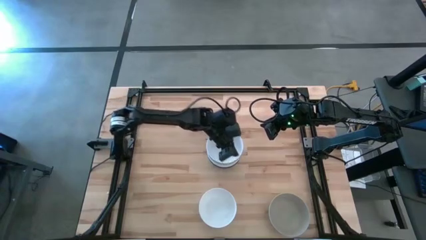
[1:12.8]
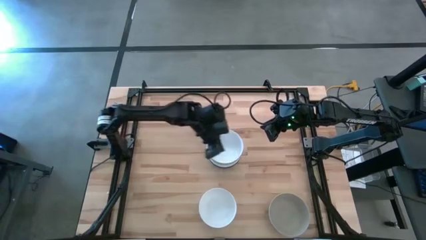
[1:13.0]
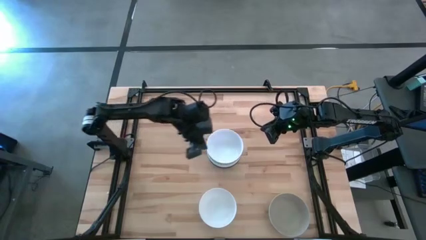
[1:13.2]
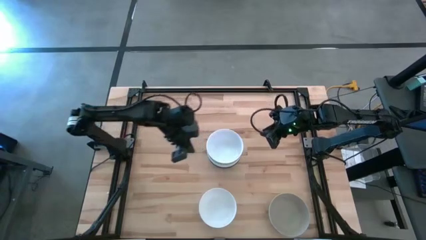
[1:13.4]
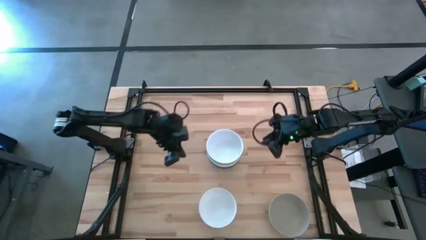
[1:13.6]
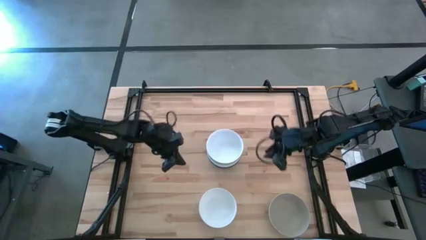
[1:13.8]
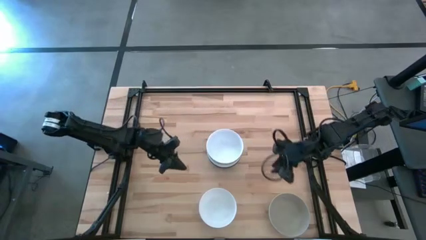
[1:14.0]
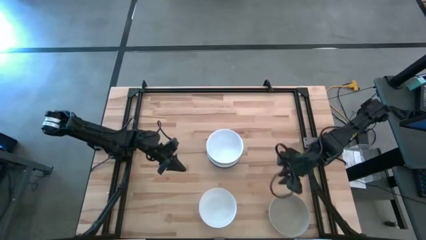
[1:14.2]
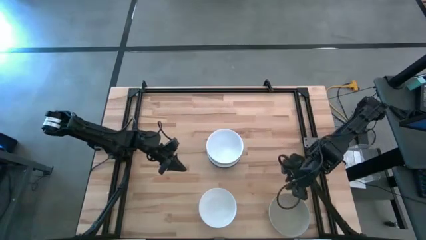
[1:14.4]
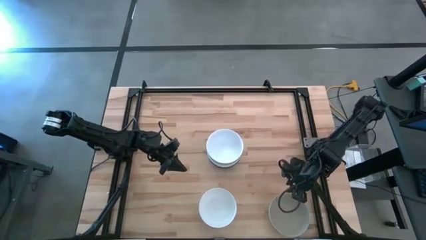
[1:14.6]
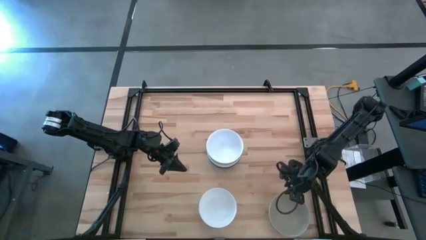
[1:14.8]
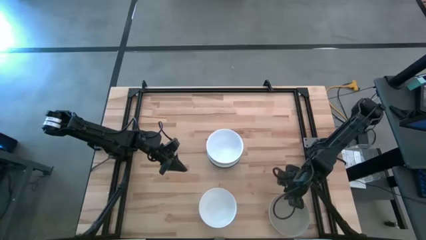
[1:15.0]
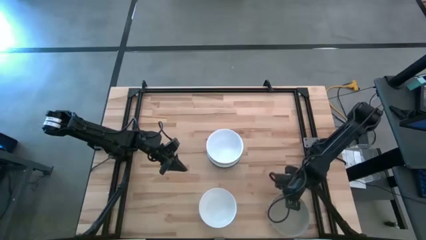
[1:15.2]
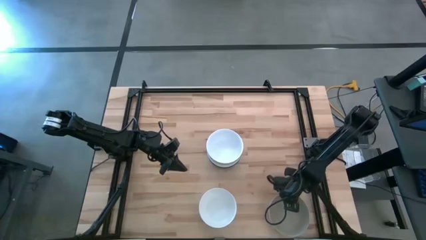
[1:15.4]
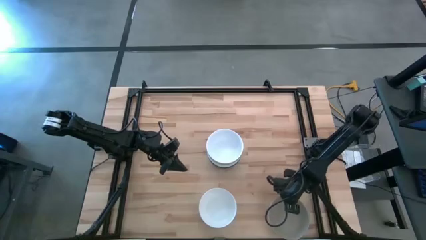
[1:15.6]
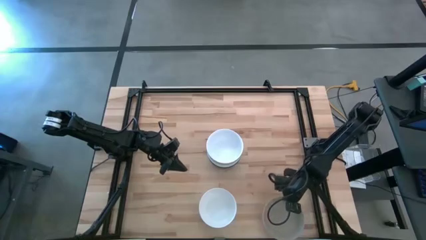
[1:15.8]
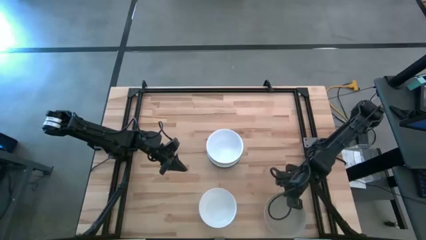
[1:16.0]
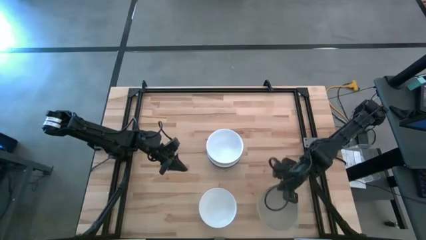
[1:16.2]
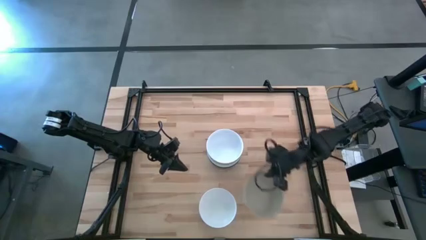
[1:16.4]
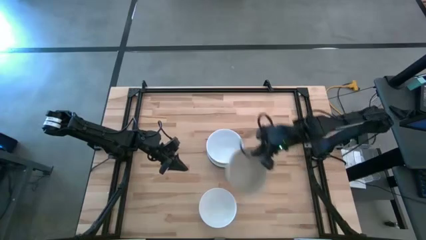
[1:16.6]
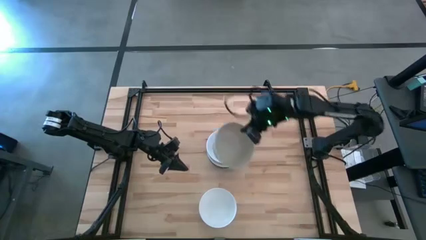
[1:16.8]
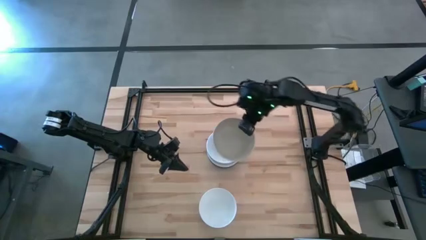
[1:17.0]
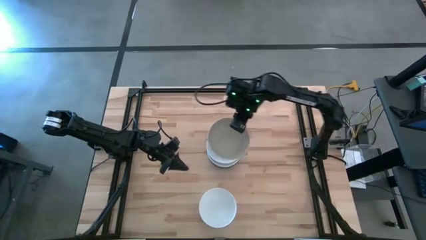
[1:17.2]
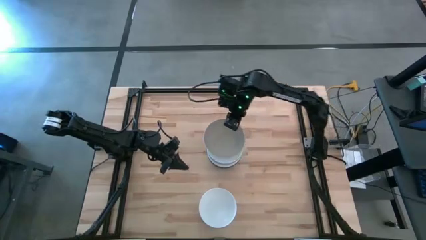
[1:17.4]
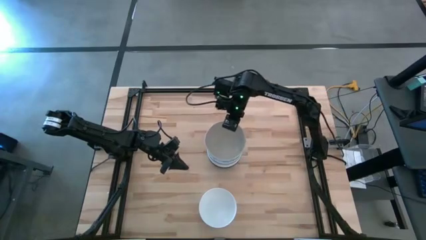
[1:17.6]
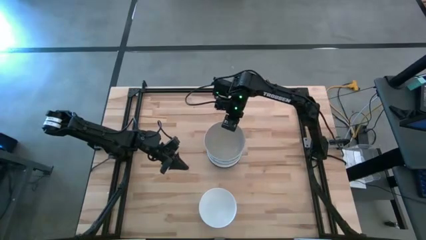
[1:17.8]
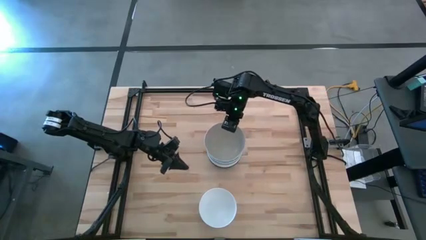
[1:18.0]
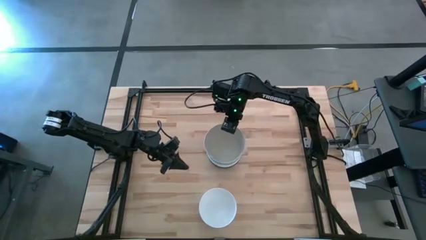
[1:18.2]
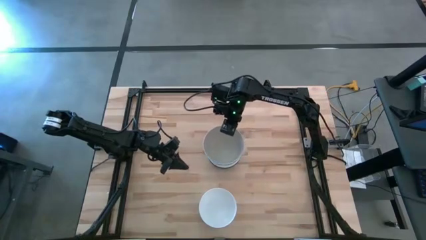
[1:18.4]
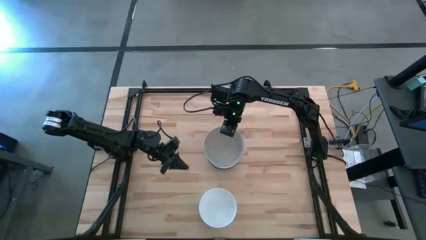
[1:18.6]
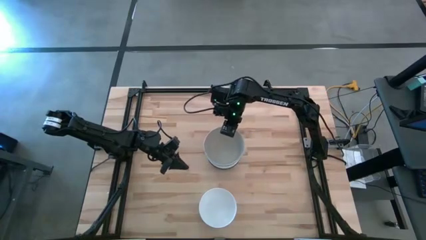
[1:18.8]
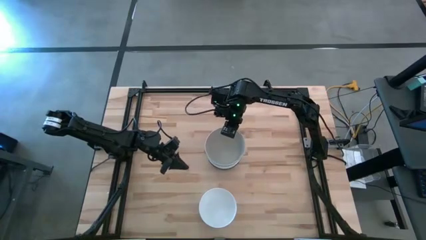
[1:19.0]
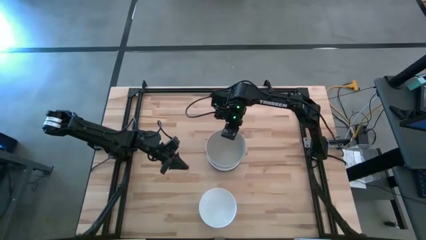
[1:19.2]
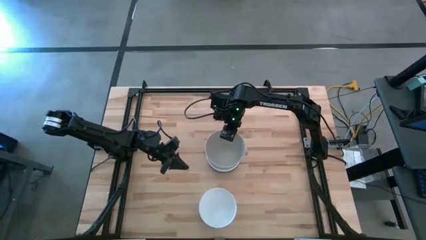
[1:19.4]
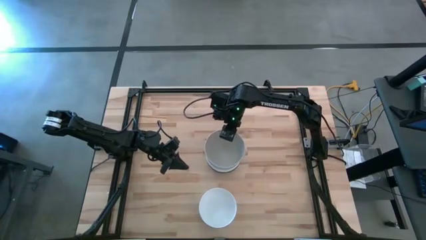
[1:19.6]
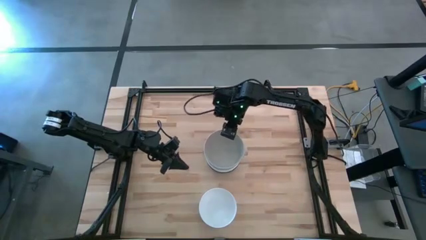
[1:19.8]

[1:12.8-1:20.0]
Task: Nest bowls inside each other
Stack the gray bowl on the white bowl

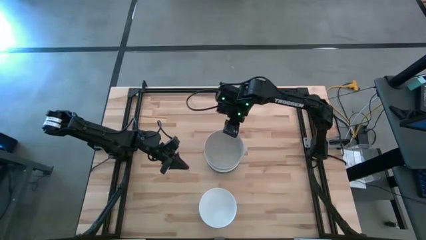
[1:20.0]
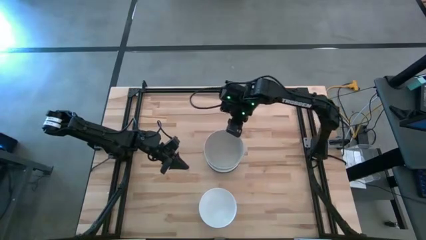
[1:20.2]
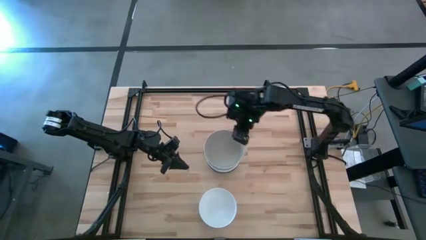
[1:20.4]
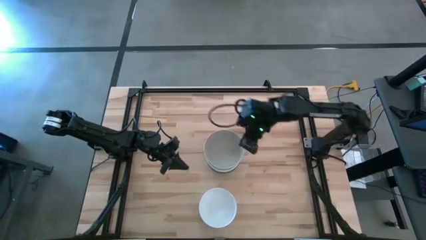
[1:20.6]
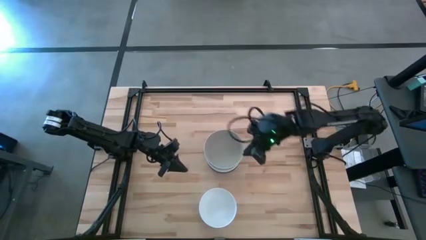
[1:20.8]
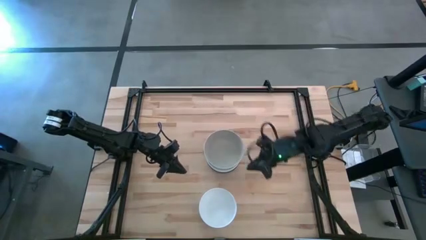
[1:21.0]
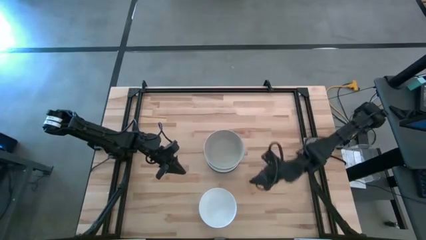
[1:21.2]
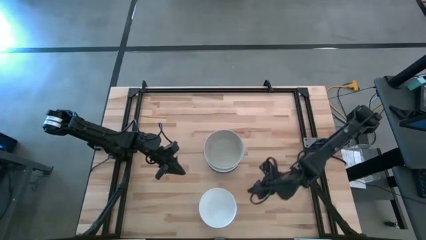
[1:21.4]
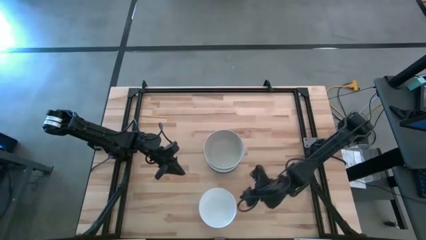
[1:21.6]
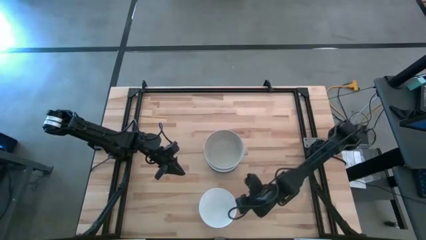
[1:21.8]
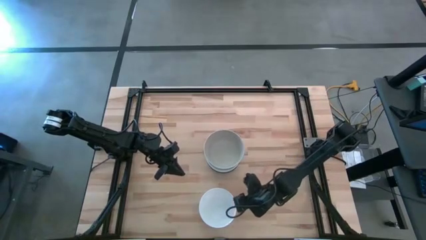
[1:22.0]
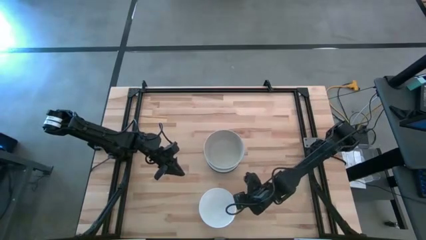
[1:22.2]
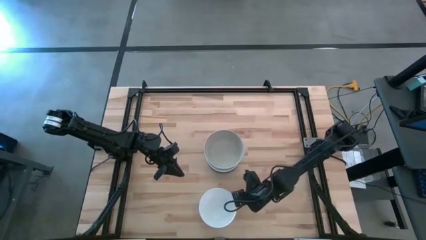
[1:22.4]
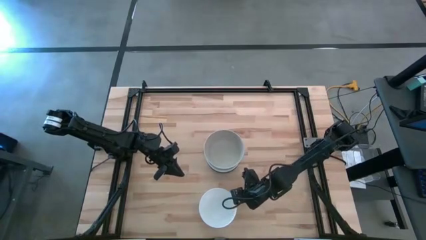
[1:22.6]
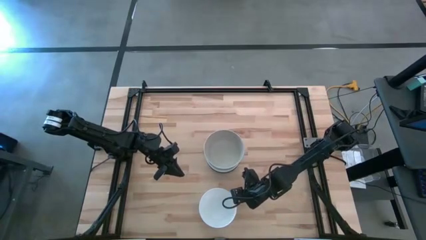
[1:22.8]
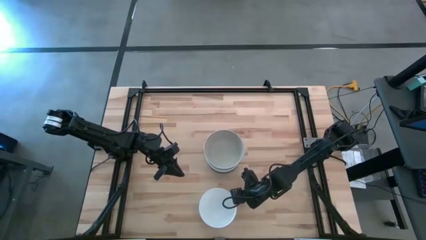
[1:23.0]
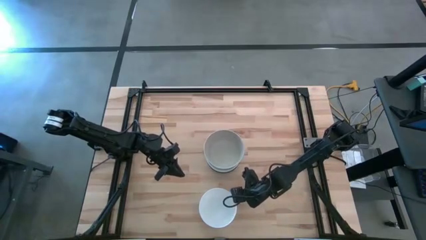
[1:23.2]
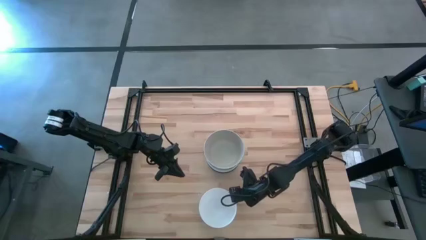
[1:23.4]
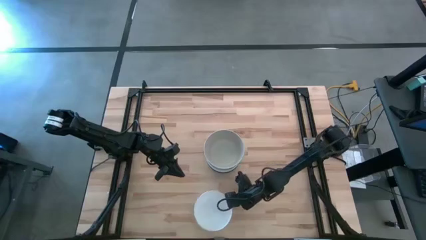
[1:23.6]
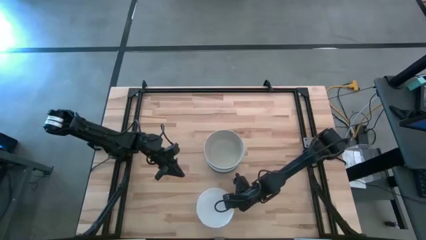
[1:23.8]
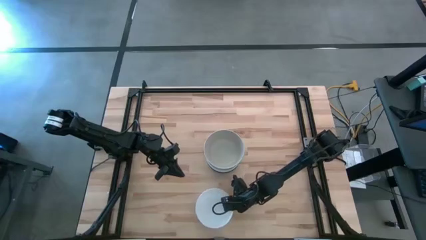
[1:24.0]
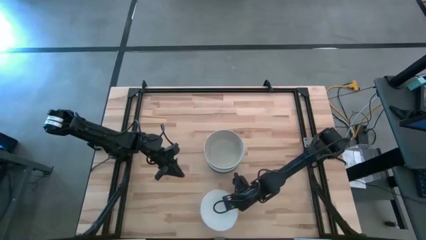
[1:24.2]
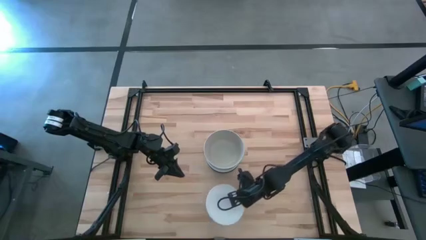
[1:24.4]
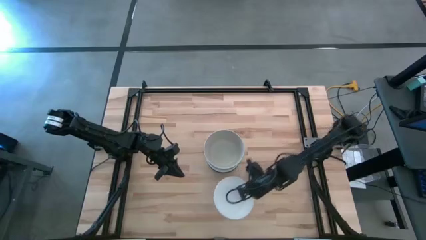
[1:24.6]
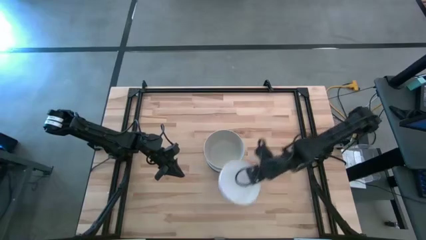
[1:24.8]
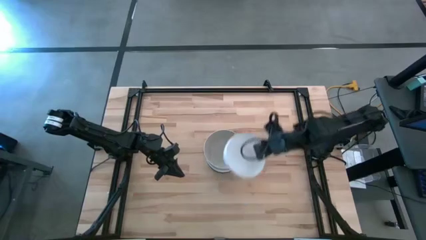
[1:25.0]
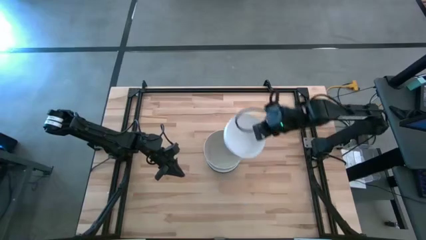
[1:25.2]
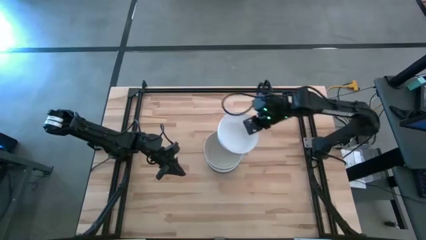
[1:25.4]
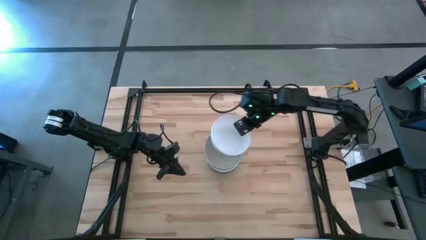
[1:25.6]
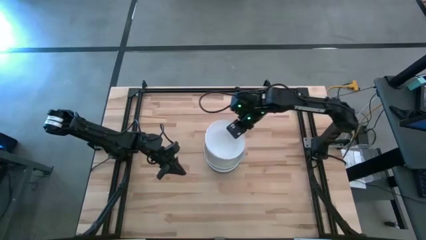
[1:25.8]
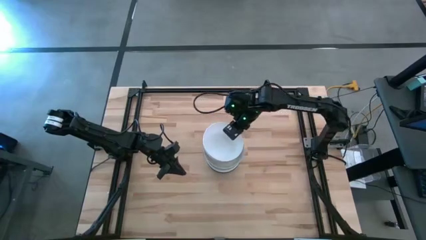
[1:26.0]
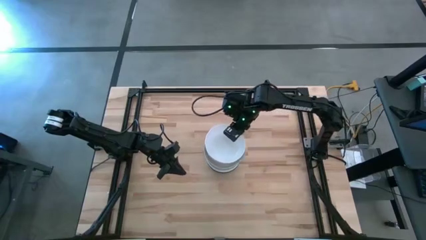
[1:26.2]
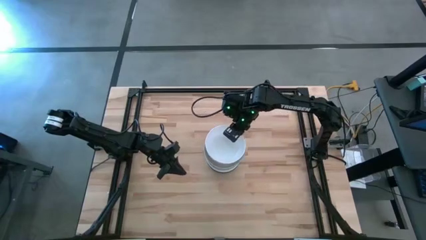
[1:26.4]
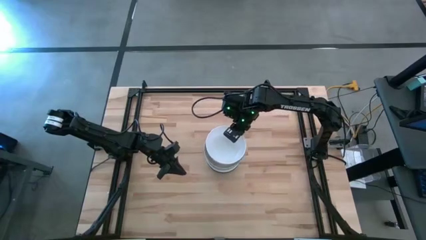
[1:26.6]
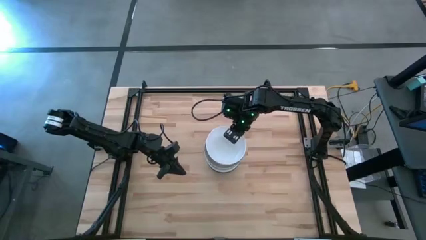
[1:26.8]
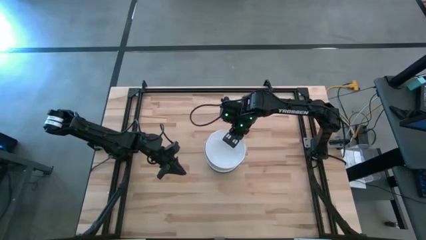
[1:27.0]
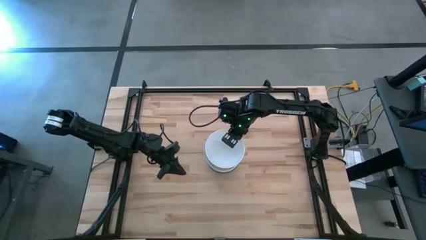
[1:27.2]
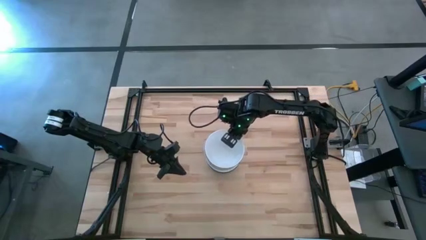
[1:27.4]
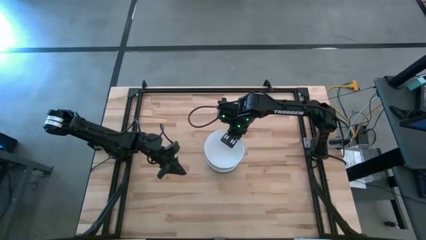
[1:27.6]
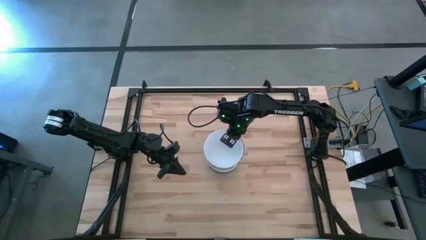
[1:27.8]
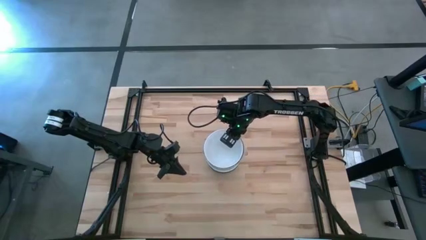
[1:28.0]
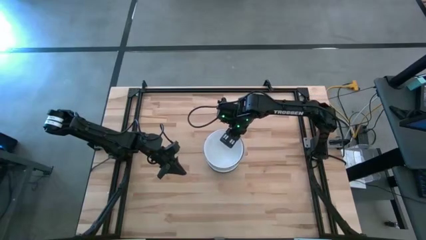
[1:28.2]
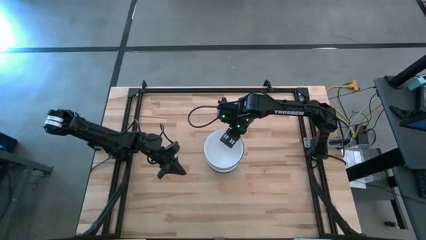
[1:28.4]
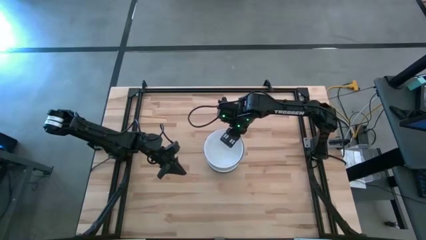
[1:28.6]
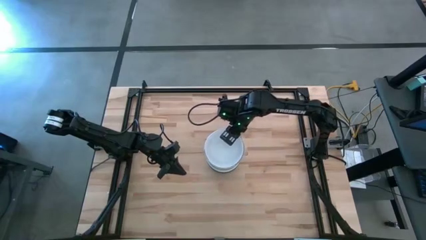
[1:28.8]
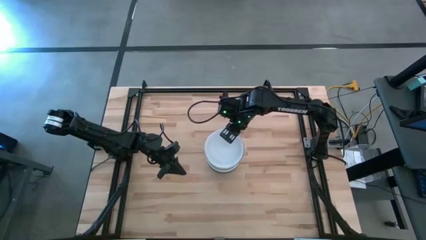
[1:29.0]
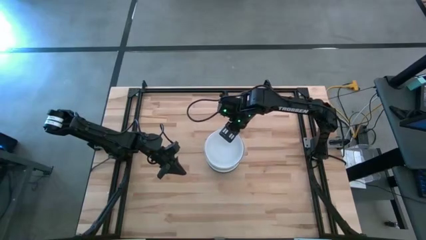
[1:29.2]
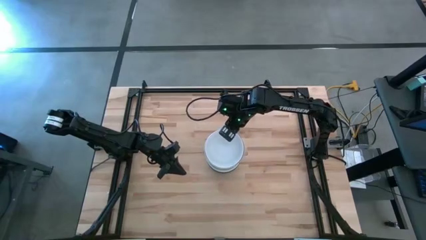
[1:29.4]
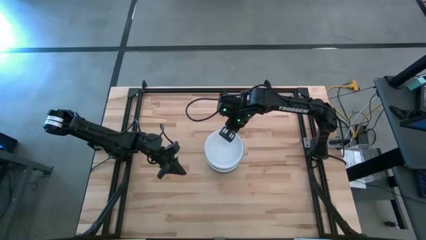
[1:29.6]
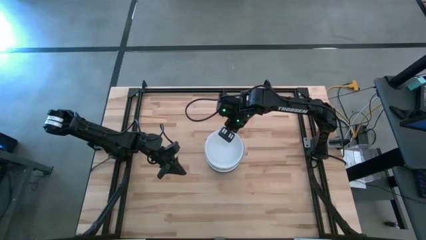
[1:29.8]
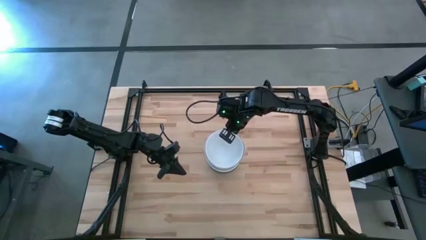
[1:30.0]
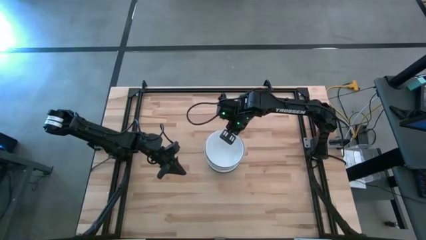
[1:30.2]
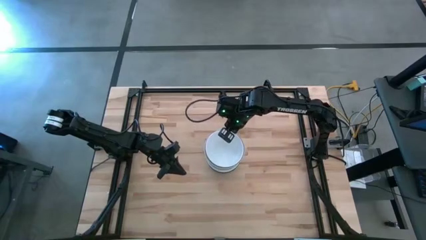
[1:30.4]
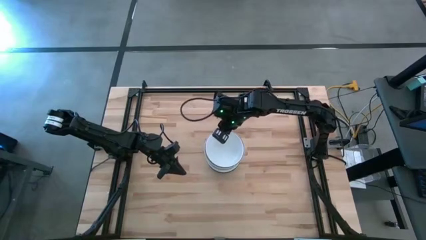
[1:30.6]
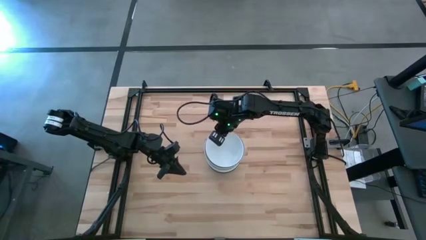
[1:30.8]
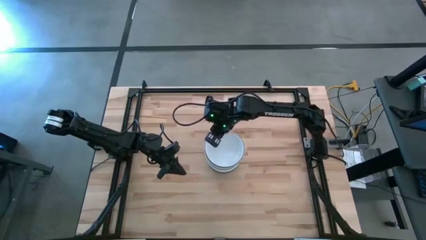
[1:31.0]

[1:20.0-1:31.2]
Stack the white bowl on the gray bowl
